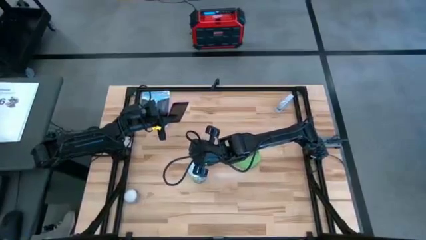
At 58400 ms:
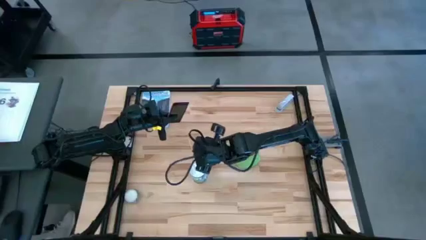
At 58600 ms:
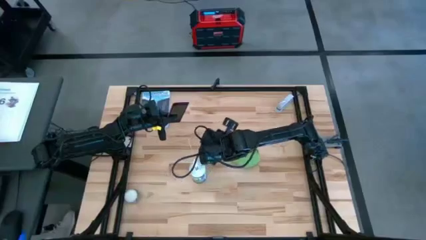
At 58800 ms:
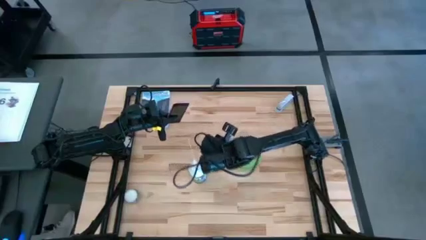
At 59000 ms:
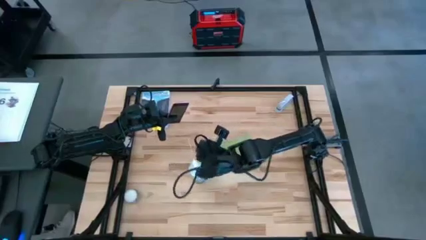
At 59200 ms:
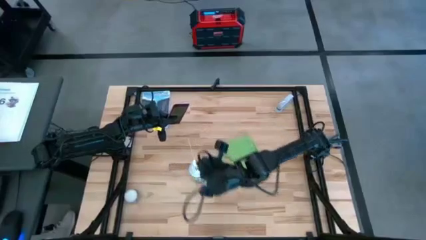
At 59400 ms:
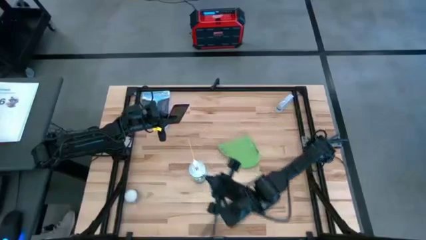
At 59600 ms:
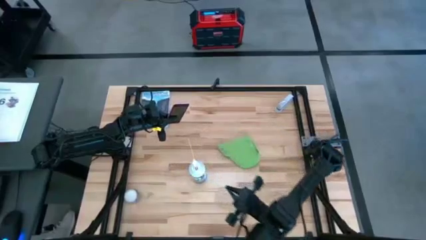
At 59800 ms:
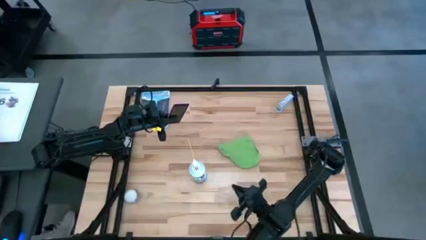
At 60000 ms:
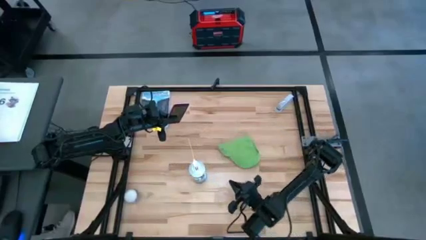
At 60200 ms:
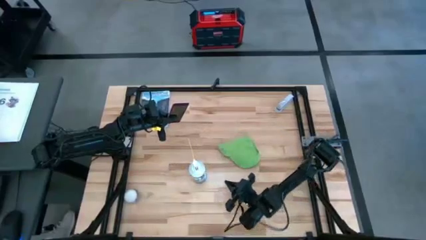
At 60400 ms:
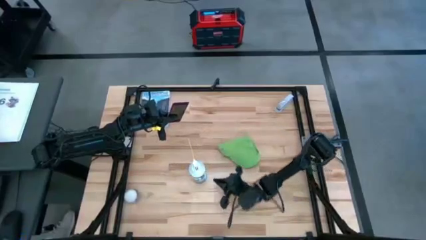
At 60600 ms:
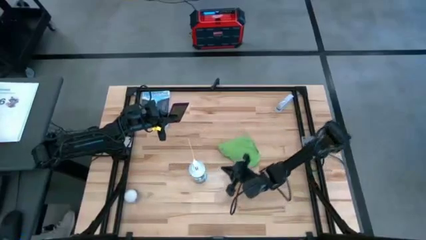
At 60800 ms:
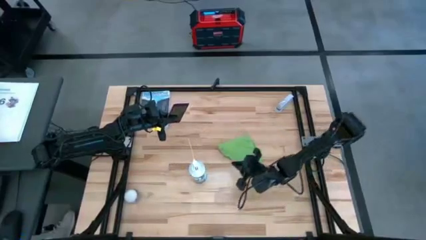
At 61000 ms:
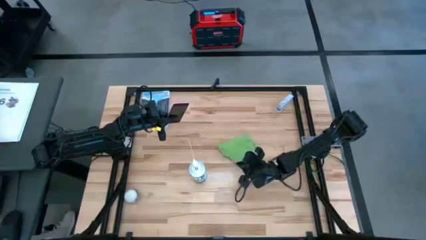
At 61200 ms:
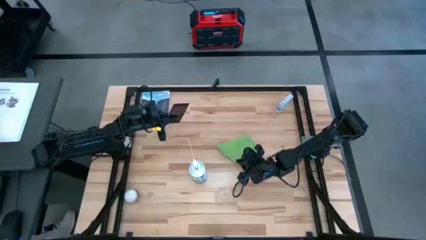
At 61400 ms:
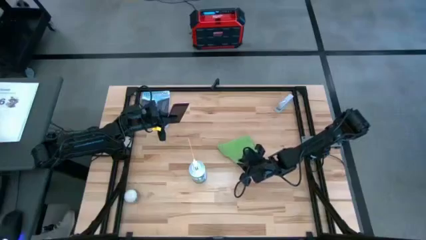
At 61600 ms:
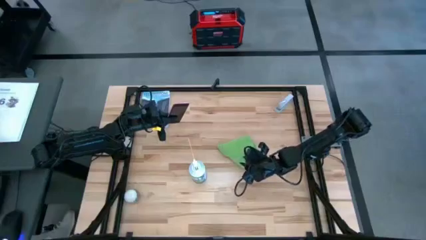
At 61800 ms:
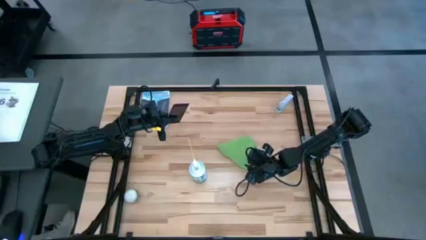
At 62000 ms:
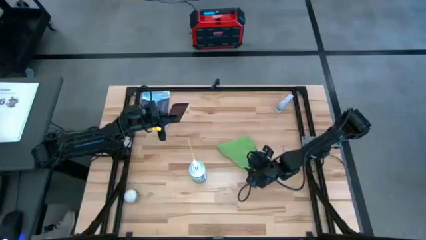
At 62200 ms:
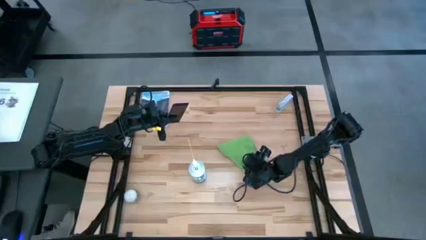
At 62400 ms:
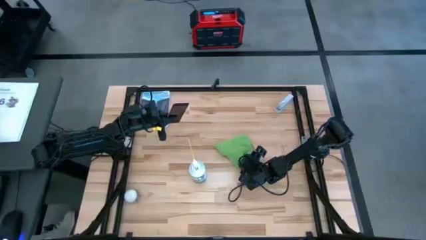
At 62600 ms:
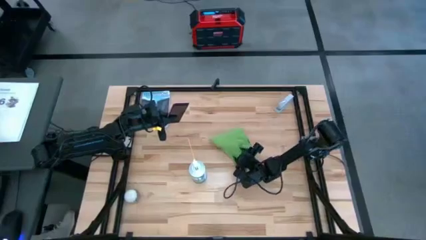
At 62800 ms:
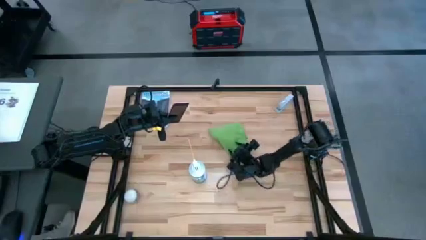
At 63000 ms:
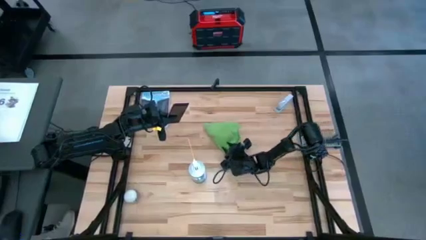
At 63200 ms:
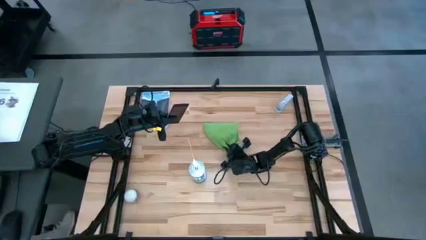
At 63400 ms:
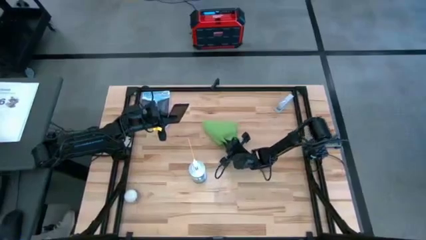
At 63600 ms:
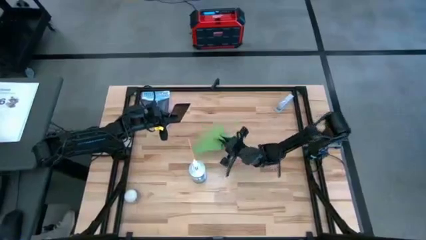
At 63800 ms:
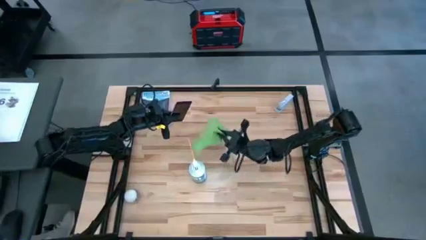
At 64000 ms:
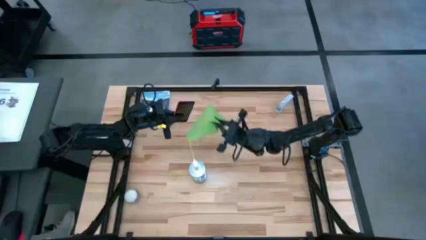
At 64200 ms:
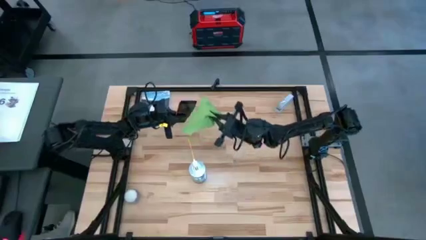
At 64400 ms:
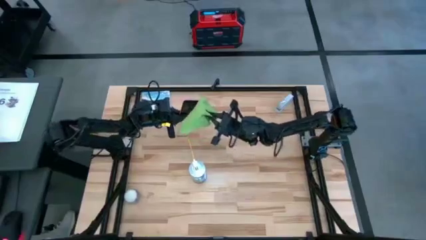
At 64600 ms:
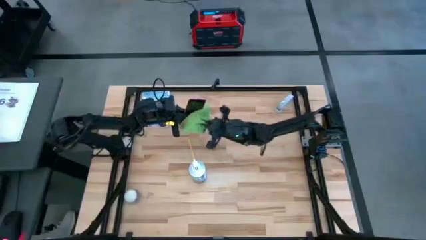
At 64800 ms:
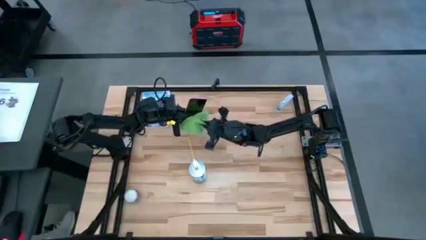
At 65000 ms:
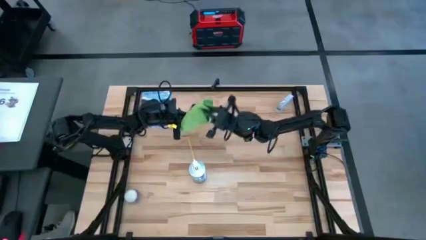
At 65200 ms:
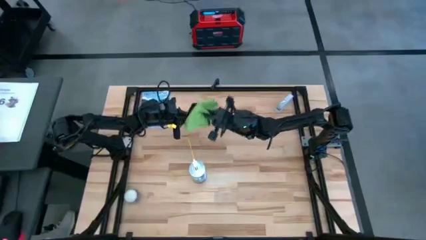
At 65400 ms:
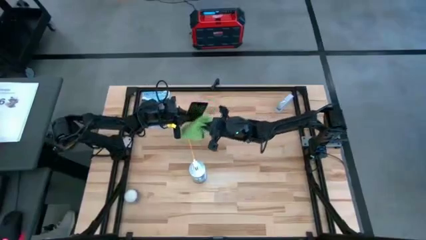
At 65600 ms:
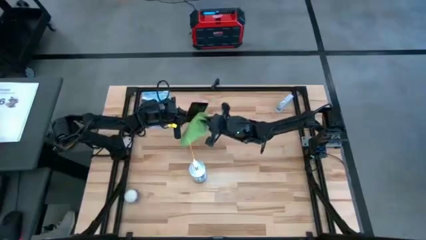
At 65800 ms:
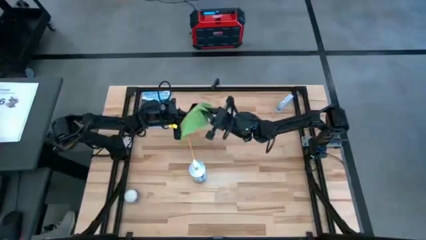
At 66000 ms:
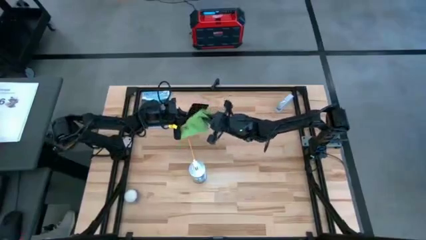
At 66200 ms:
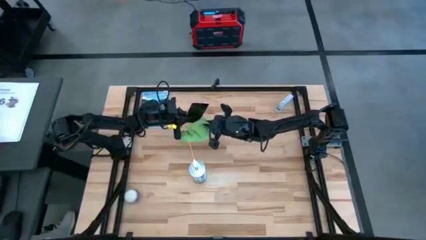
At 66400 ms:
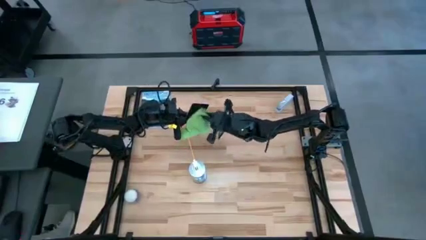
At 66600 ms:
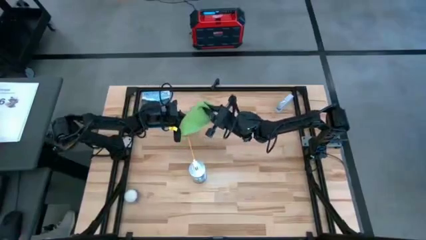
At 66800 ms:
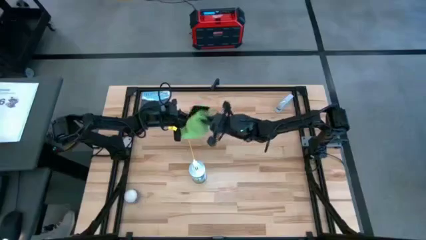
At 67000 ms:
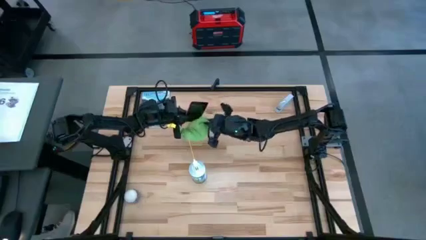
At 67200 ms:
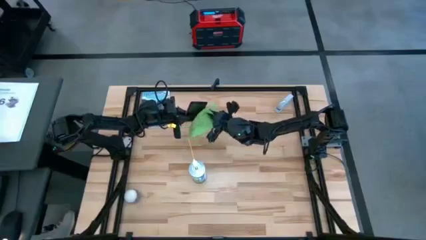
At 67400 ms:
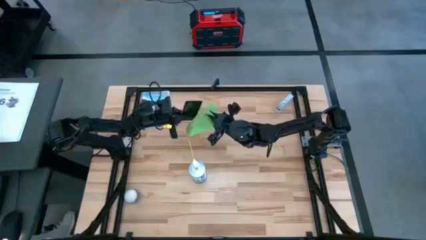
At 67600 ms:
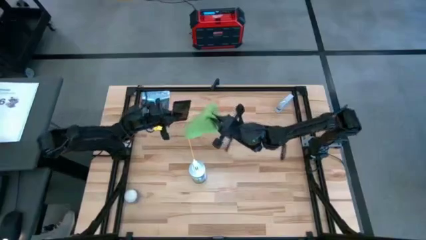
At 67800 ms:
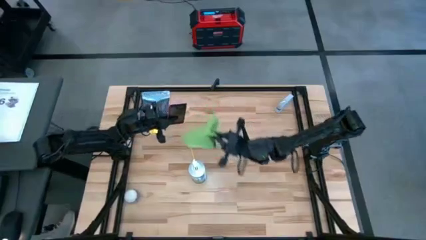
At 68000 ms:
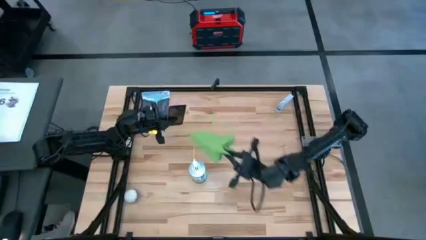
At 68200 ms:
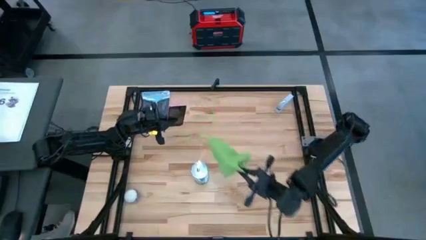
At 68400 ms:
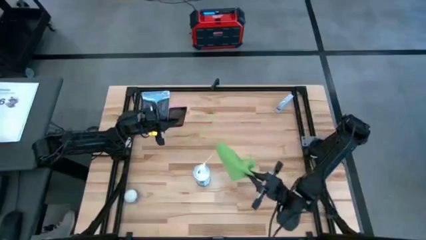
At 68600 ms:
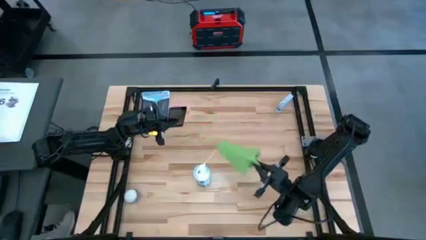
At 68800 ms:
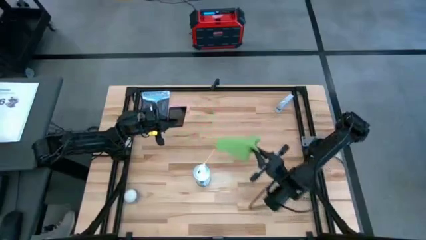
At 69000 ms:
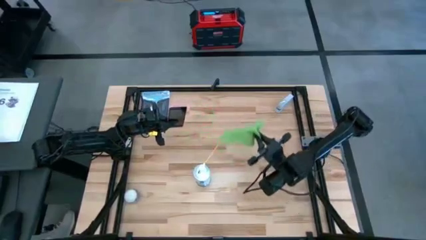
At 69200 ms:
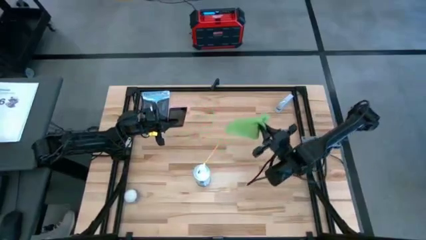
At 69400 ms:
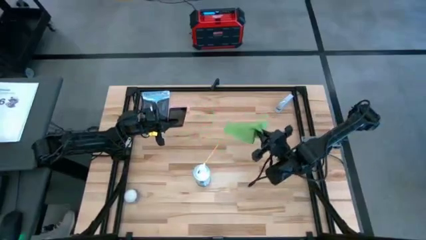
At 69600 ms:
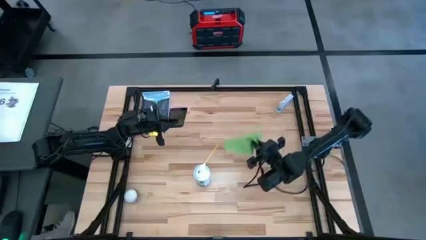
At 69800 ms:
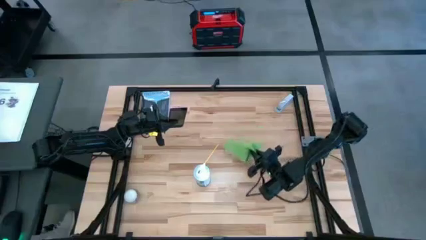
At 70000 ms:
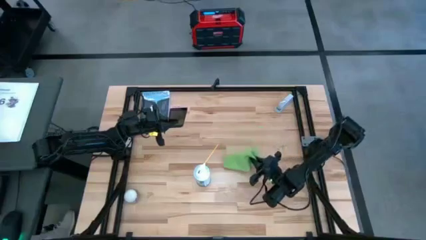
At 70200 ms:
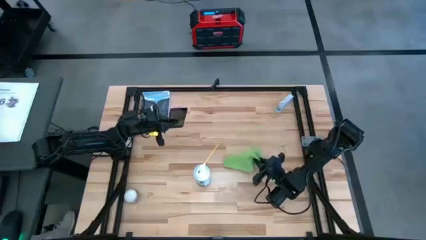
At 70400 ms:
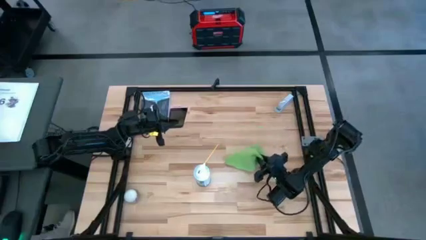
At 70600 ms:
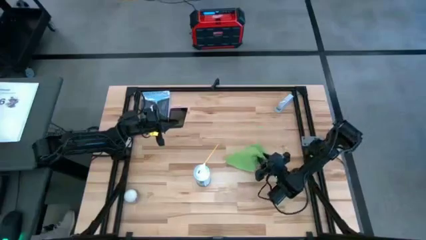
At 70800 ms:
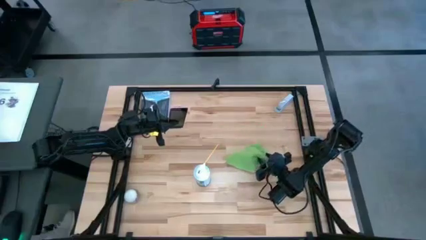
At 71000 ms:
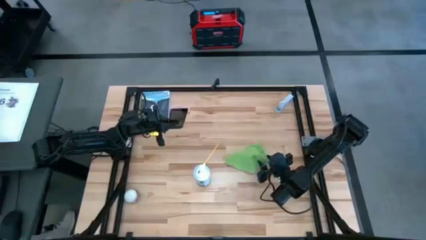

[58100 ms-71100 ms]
Task: Apply microfiber cloth
Wipe the front of the black cellphone with the green microfiber cloth

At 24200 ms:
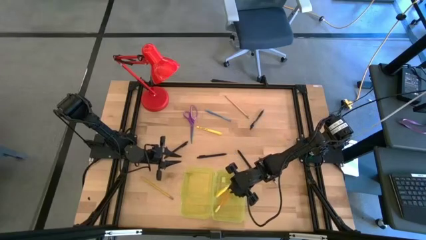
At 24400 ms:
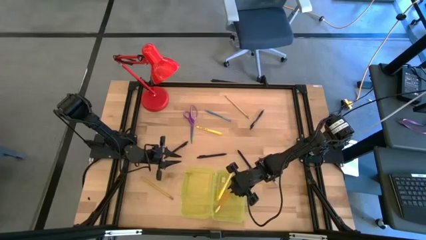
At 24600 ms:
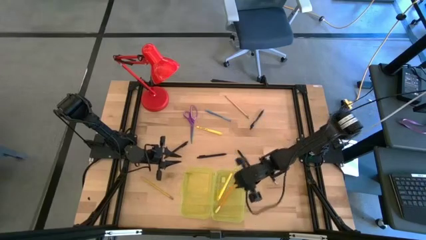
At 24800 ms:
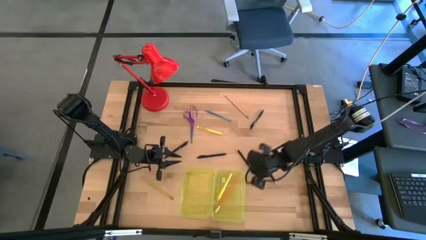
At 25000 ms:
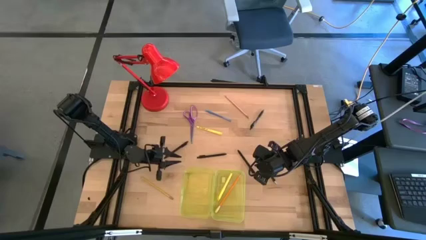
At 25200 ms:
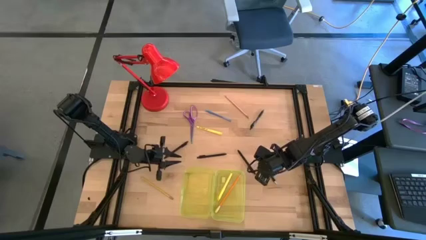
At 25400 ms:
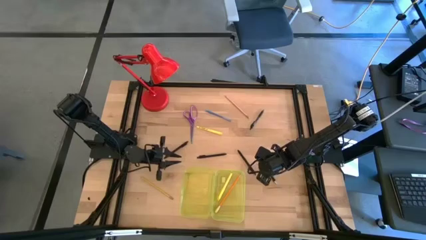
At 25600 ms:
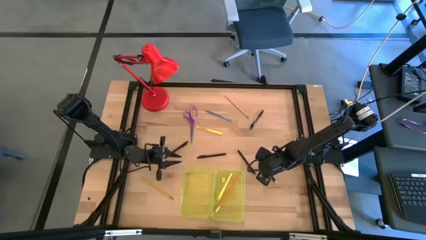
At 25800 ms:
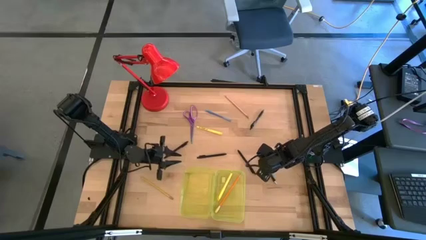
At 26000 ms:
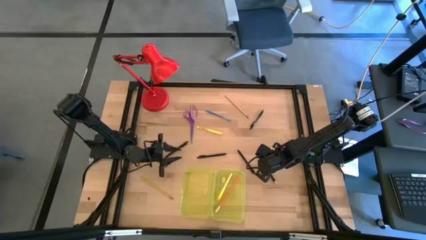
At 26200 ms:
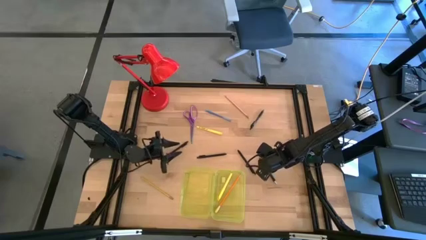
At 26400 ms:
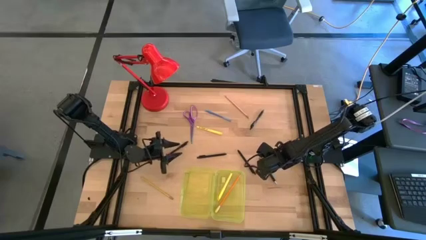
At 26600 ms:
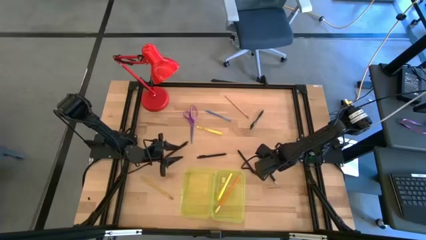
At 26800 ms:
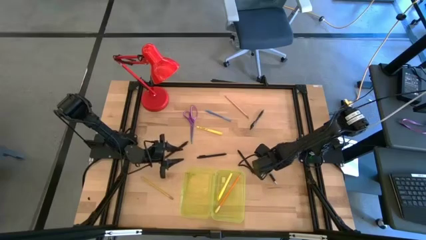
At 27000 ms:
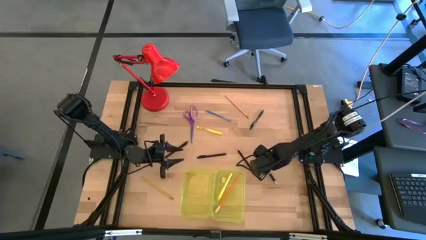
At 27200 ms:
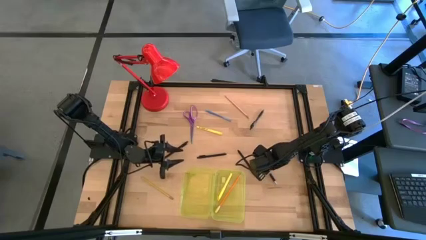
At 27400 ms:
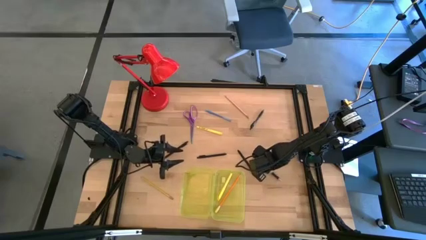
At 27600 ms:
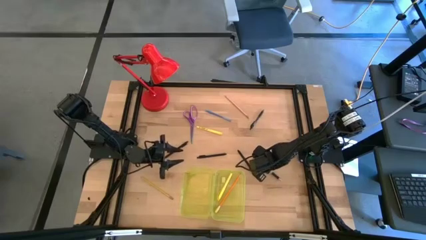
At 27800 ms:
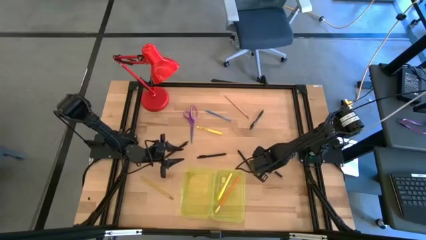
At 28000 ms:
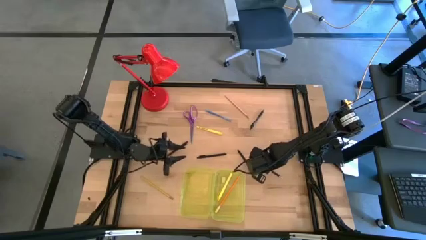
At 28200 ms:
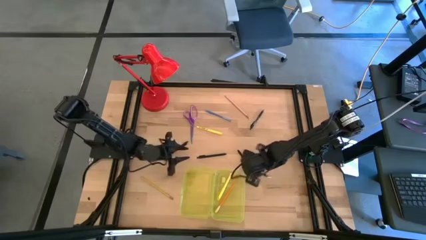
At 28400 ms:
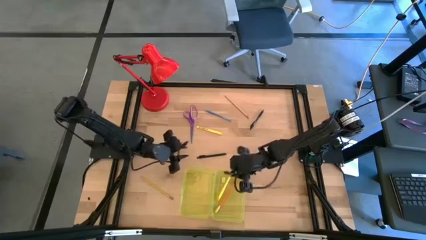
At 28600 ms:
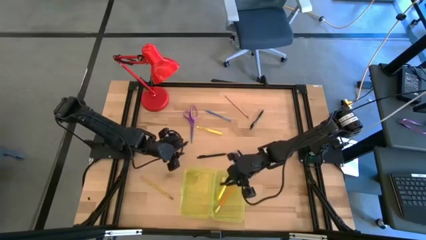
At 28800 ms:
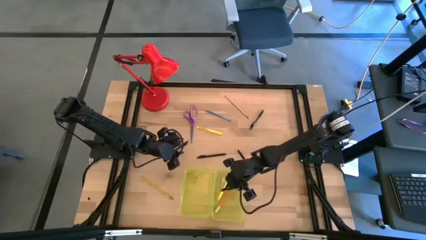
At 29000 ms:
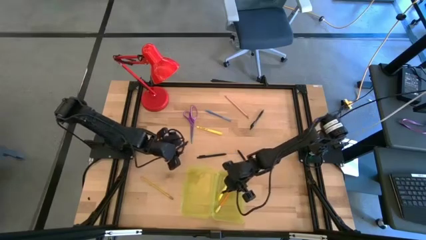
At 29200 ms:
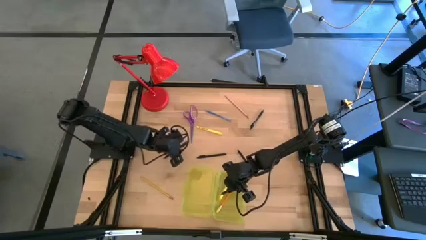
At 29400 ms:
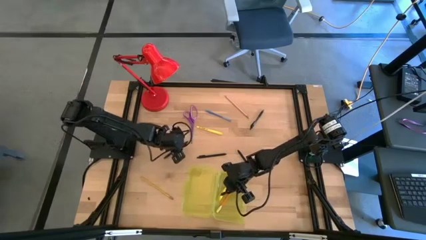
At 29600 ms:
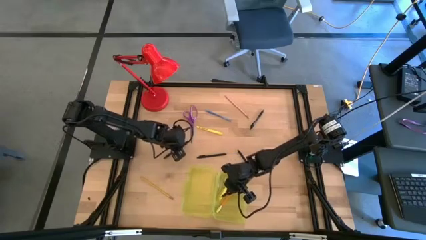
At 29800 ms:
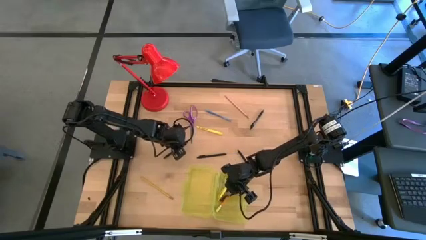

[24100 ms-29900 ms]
Task: Pick & place school supplies into a supply box
Put the black pen into the yellow supply box
